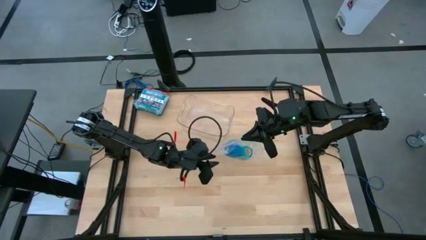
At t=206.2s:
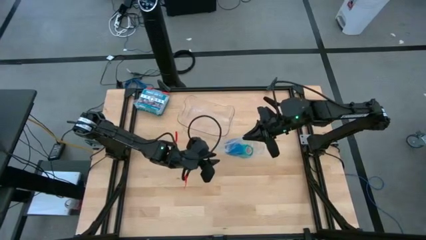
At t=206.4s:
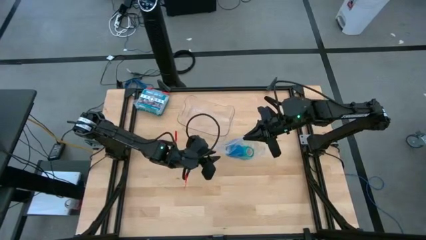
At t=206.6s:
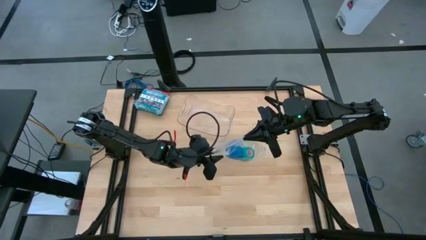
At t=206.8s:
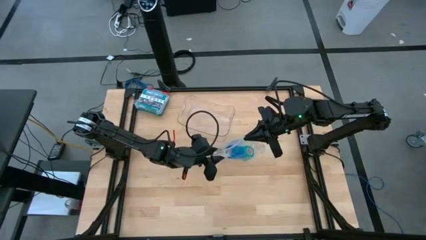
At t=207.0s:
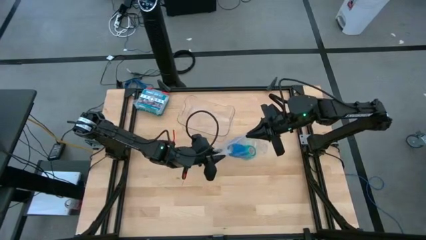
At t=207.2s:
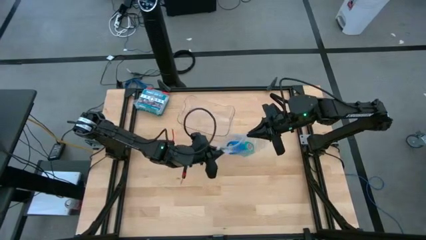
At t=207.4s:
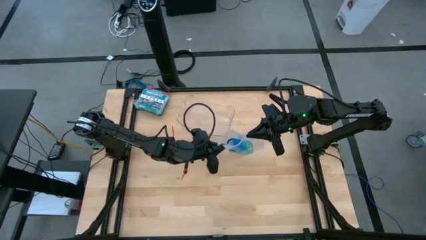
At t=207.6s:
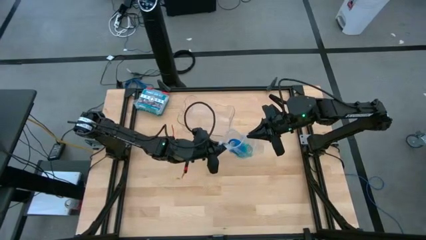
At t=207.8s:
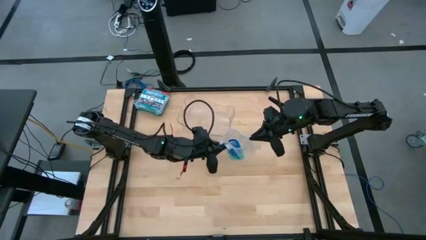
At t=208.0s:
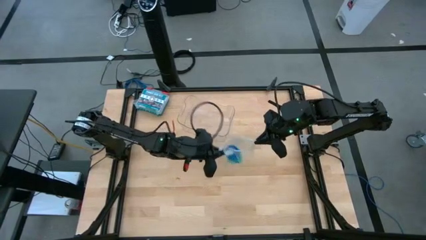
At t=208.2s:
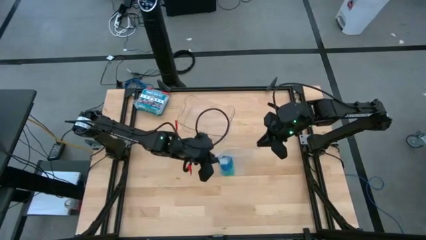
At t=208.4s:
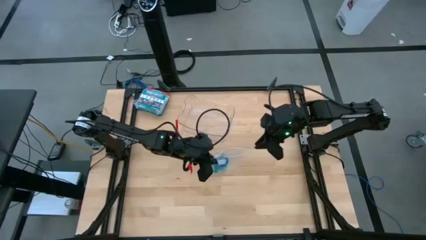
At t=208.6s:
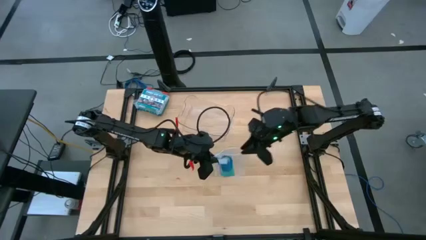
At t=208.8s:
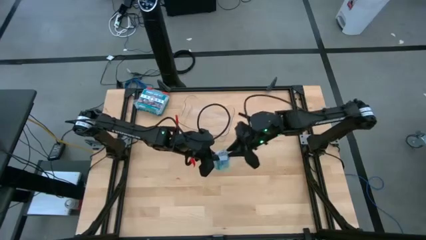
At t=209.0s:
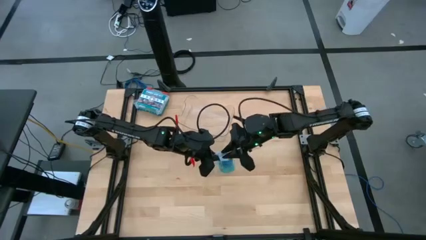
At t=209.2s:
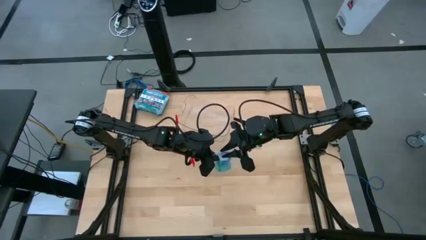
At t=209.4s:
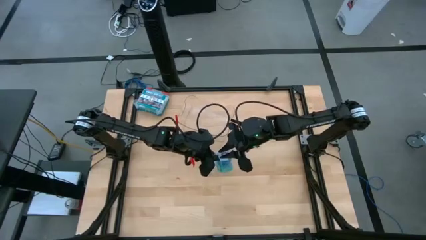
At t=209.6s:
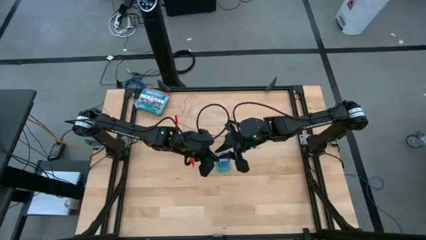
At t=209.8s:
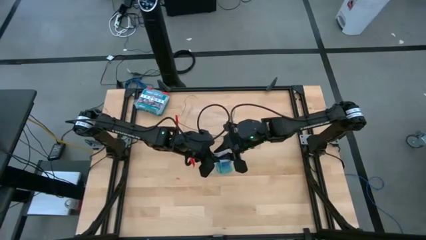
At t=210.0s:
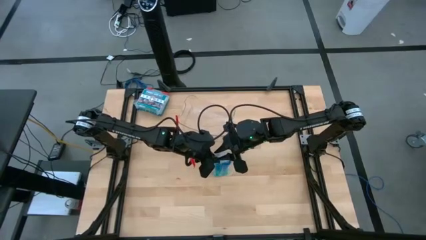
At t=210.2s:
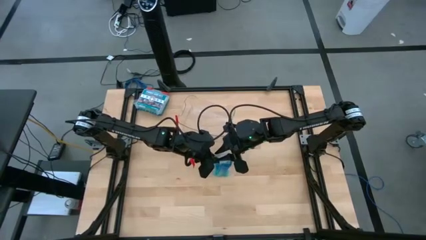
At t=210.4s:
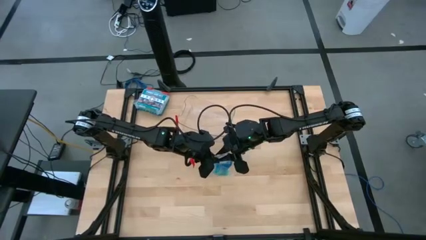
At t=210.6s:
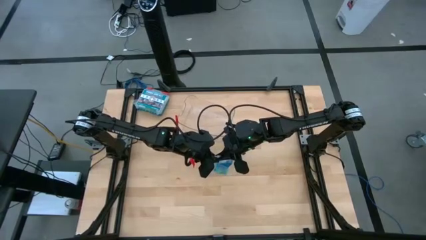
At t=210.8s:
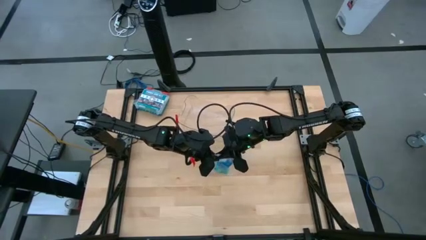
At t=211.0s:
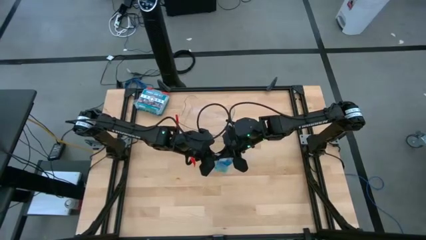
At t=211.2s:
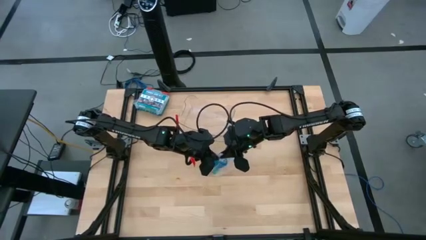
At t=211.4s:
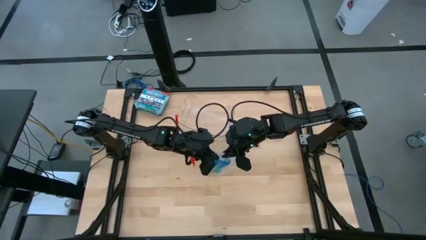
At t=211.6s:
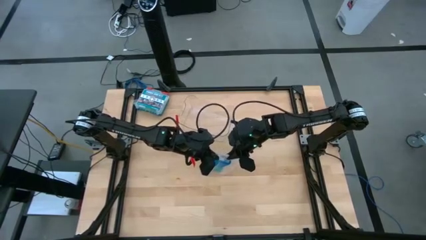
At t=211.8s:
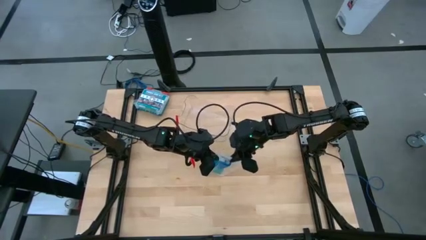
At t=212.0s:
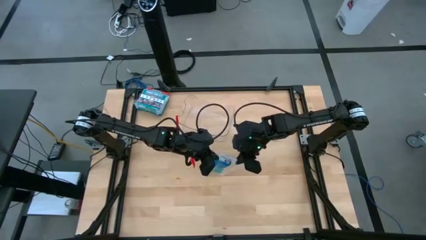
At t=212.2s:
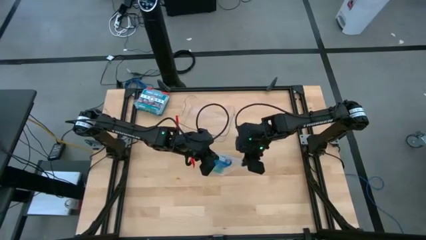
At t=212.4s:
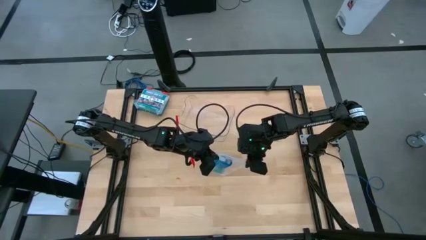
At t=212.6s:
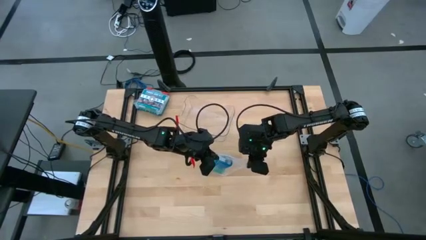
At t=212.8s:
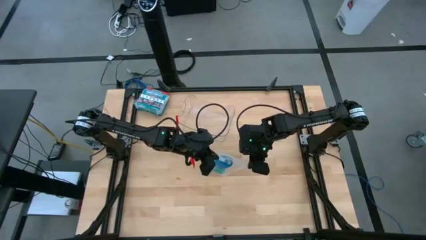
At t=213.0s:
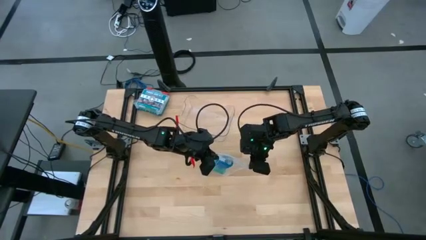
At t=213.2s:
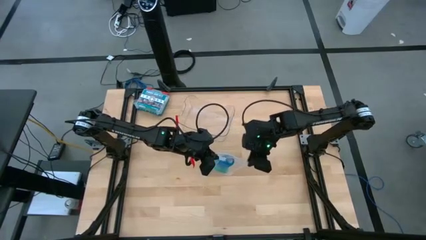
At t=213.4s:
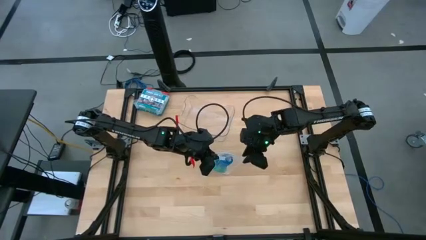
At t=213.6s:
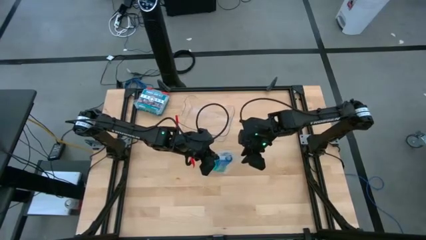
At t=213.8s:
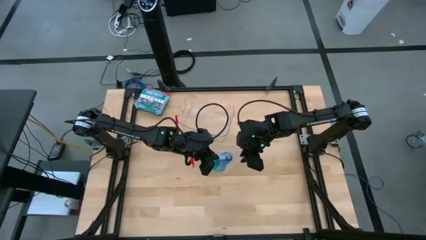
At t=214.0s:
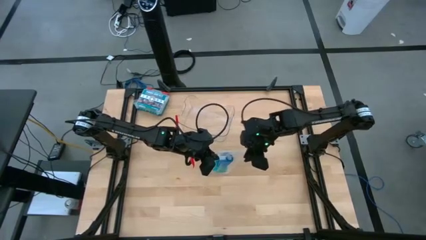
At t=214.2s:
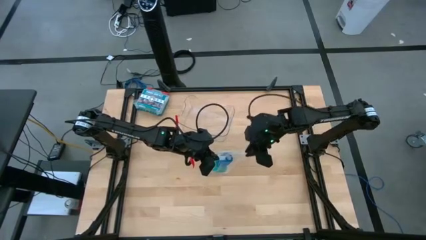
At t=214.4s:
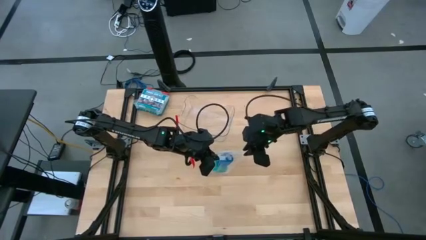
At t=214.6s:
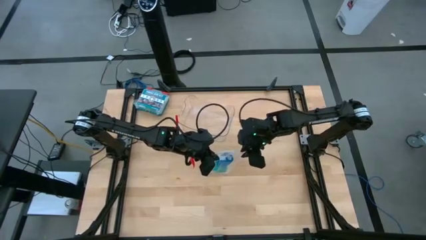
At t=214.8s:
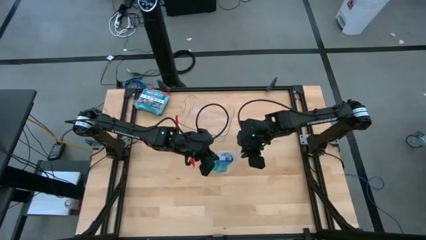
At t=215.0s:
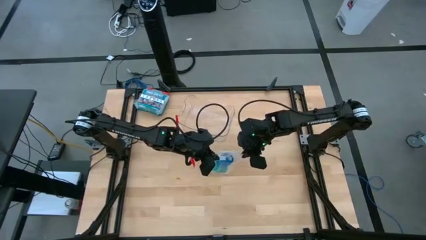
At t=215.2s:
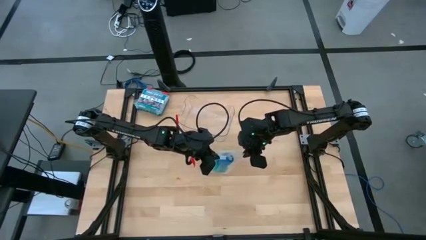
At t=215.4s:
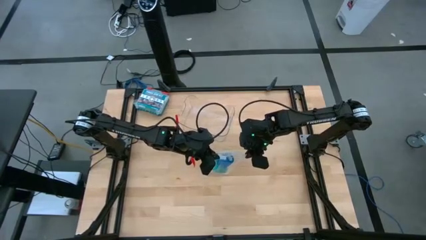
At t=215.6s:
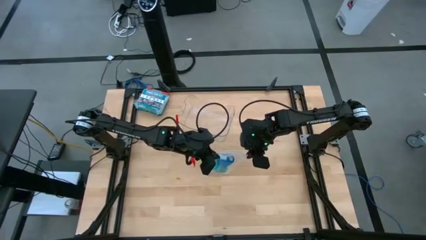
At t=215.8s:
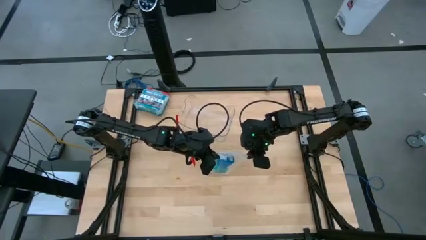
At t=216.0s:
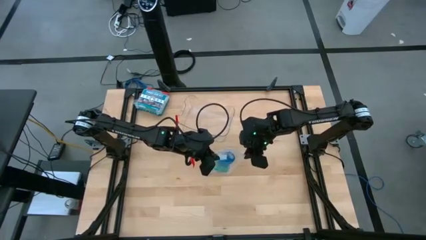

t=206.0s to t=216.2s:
Task: Roll bandage
Close the transparent zip bag

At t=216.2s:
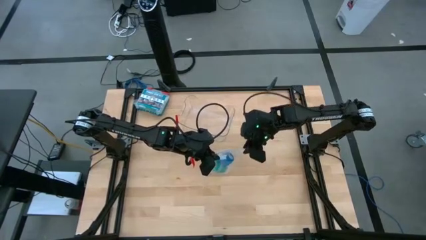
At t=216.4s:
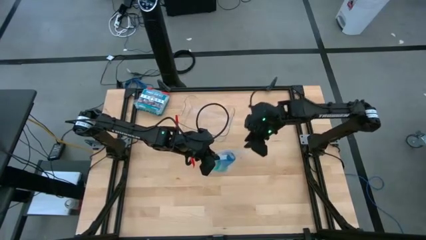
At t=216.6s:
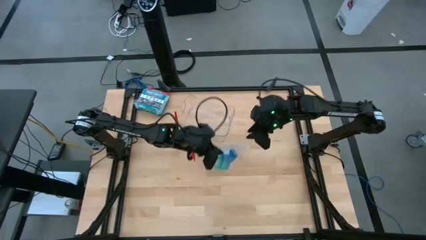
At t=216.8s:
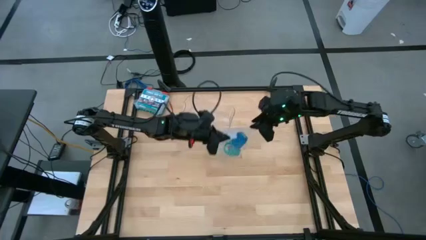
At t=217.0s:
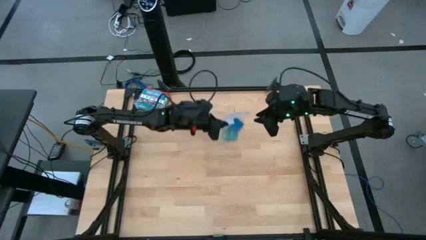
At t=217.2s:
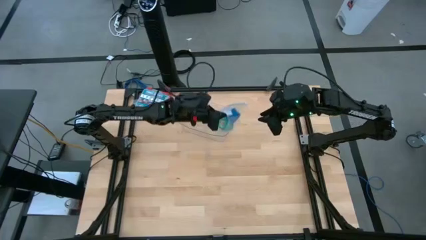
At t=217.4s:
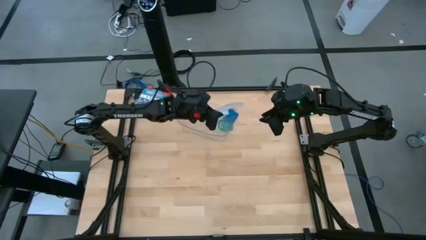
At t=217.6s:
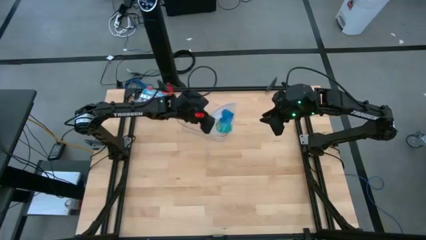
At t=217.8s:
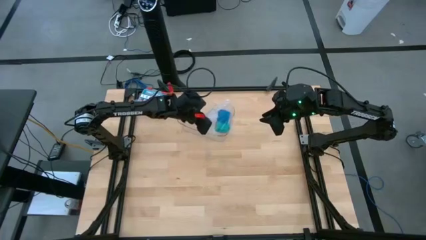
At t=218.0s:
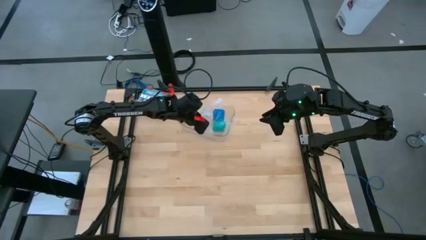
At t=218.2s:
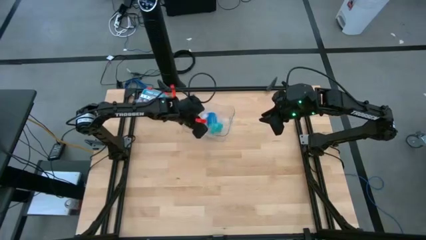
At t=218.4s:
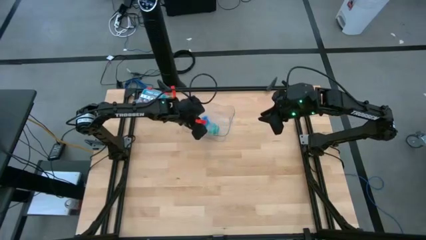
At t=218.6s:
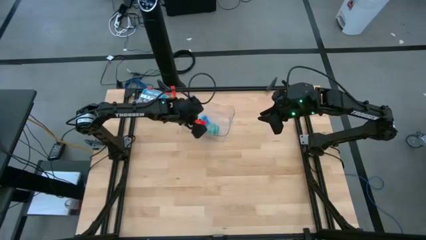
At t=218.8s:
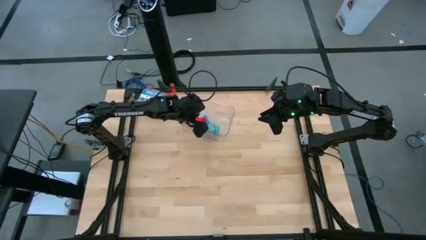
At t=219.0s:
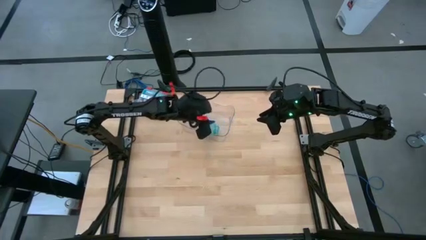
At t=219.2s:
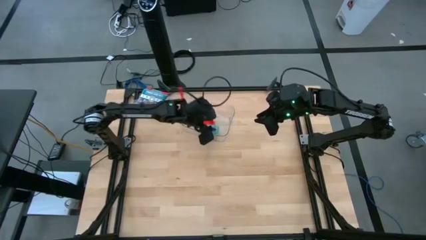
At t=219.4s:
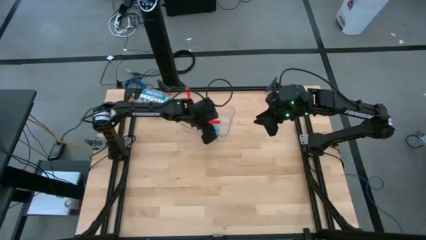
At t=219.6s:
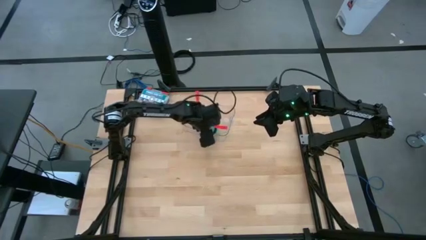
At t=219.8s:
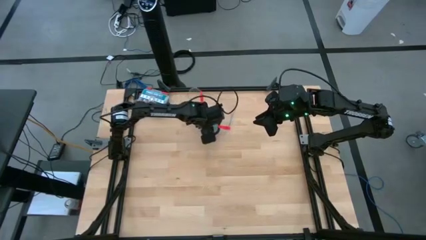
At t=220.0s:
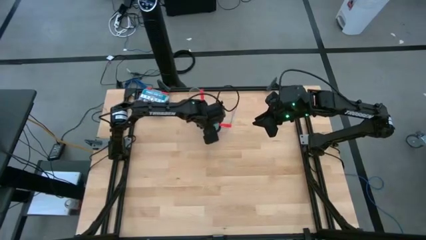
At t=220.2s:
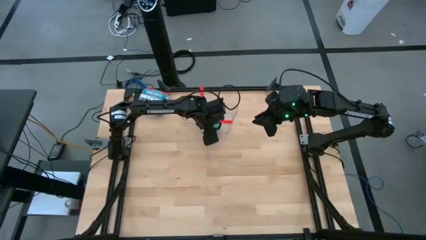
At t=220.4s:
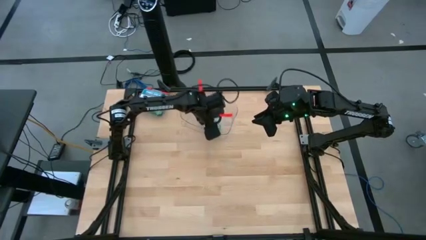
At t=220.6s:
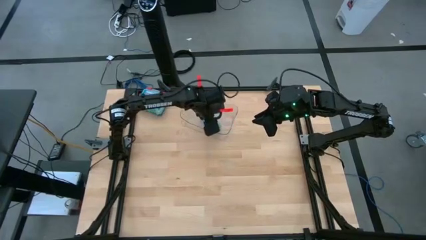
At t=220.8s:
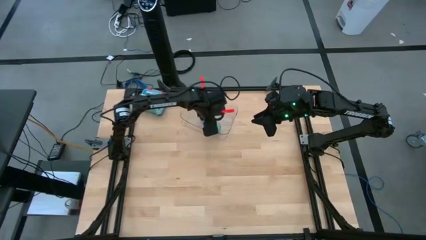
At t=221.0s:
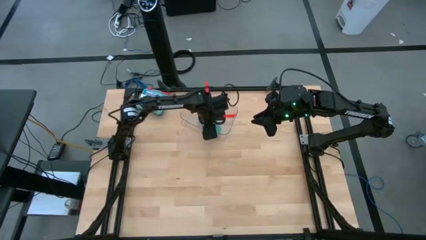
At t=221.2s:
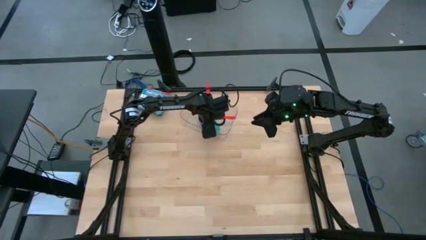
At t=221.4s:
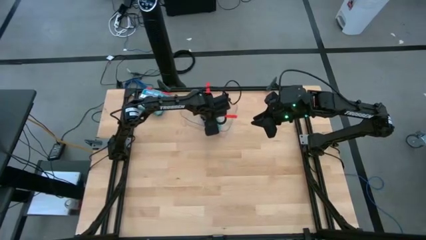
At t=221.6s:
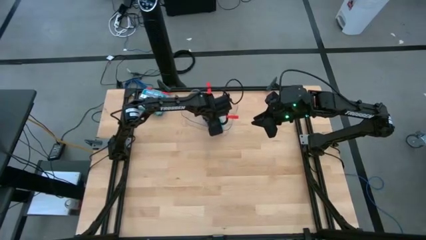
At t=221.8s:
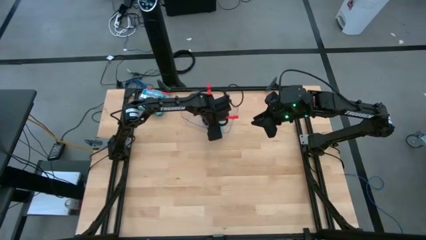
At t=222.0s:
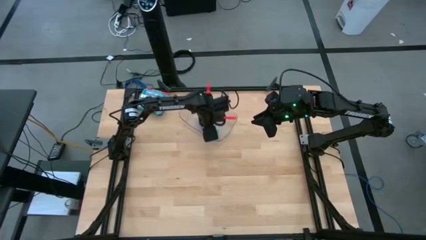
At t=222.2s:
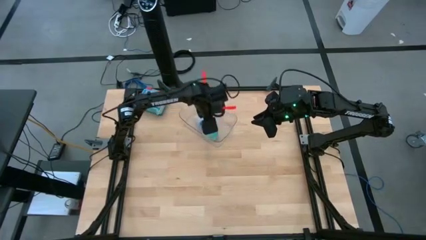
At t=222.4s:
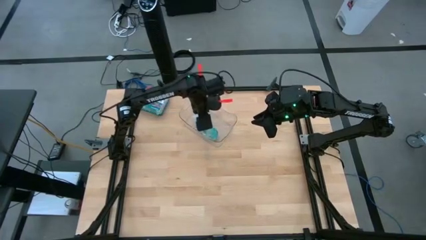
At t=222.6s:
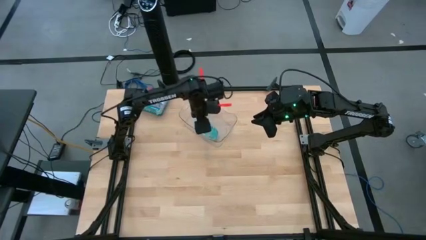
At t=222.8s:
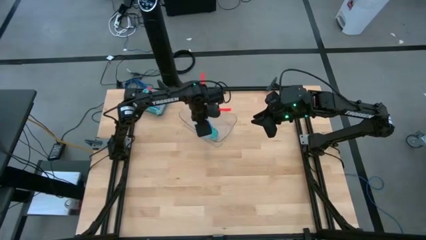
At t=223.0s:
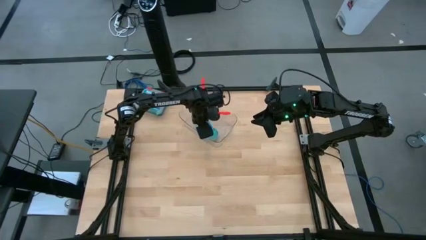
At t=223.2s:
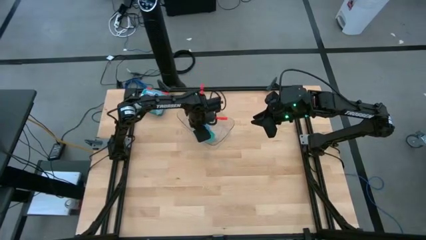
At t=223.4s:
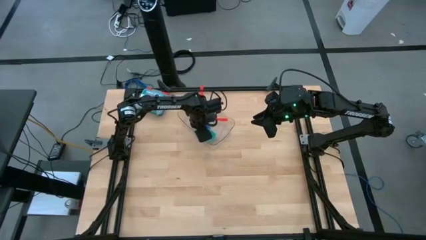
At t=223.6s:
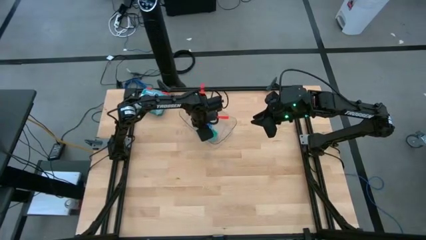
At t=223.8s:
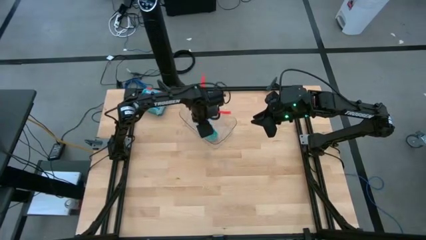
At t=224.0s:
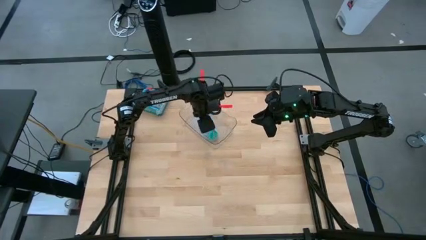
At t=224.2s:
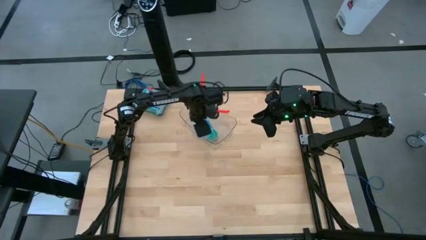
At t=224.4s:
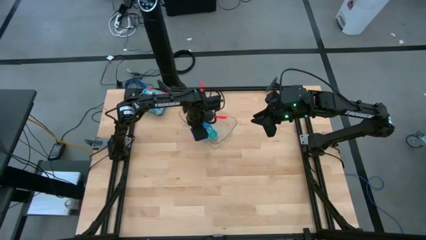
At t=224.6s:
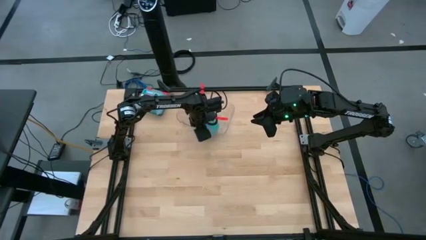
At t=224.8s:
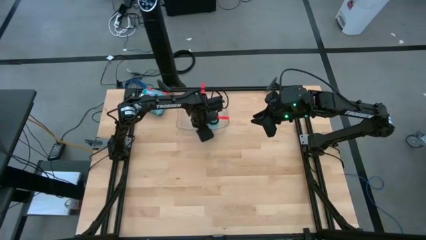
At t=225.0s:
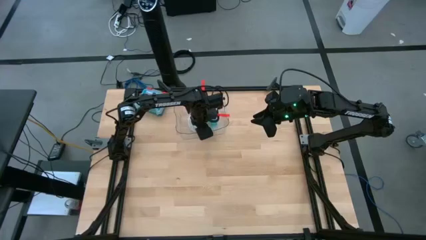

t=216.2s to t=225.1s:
Put the transparent zip bag into the transparent bin
